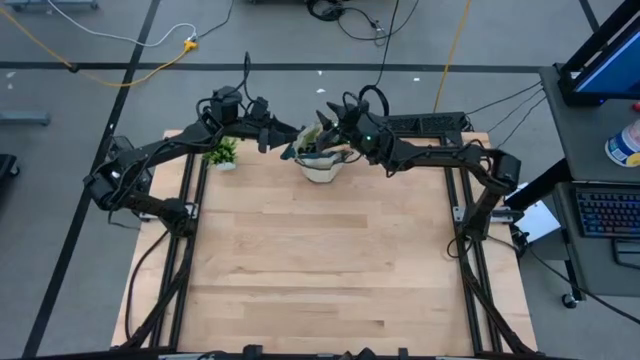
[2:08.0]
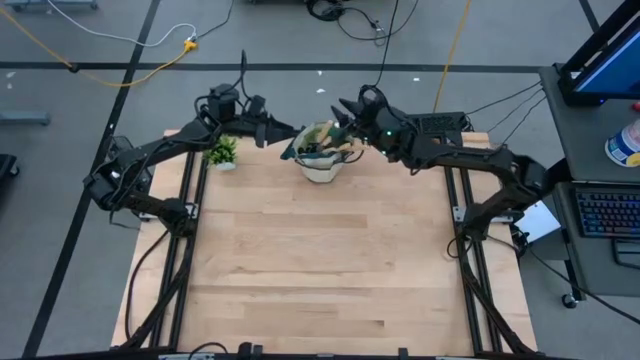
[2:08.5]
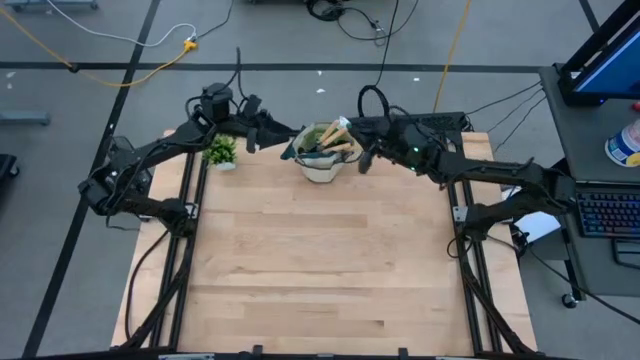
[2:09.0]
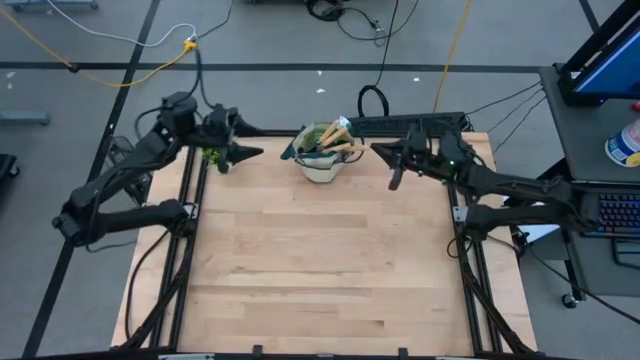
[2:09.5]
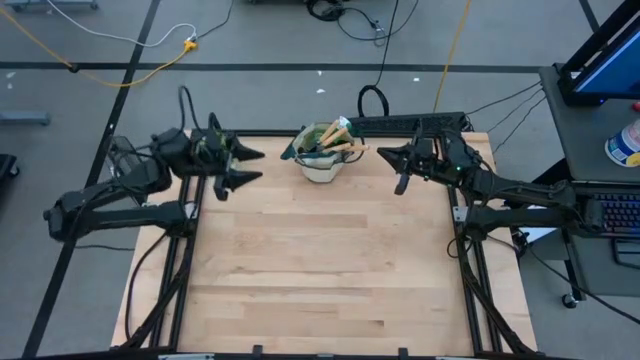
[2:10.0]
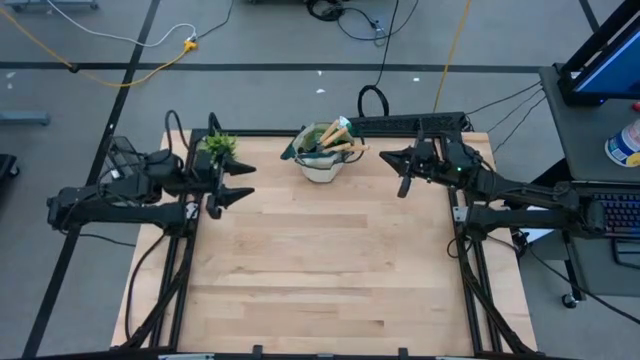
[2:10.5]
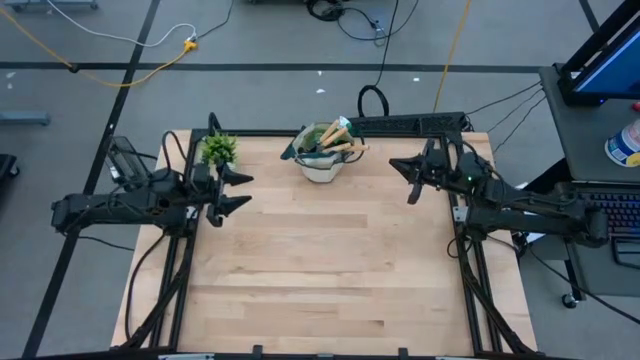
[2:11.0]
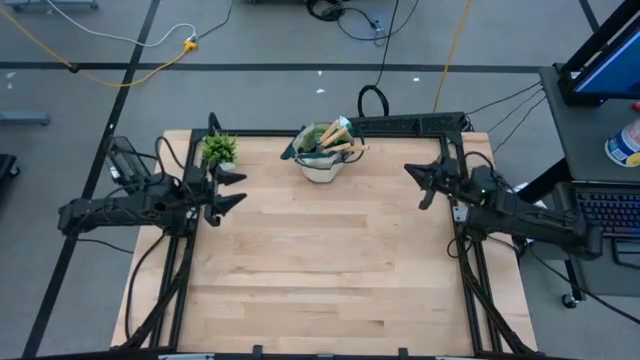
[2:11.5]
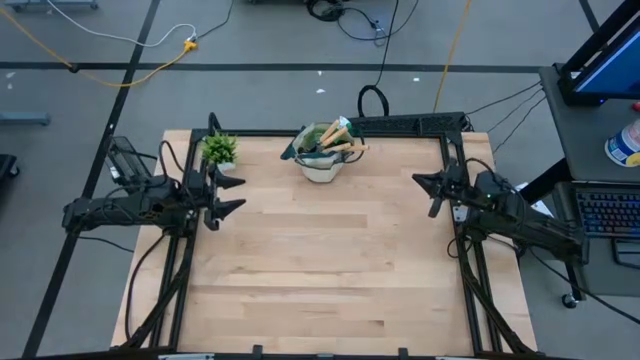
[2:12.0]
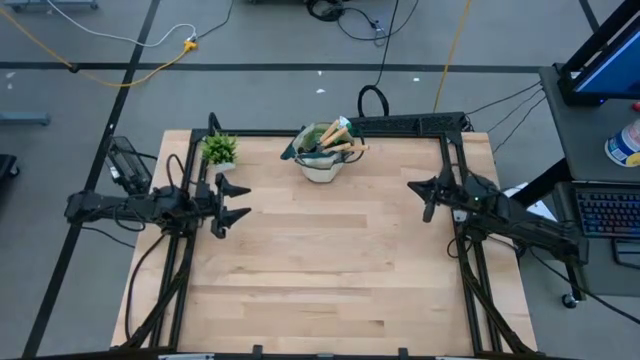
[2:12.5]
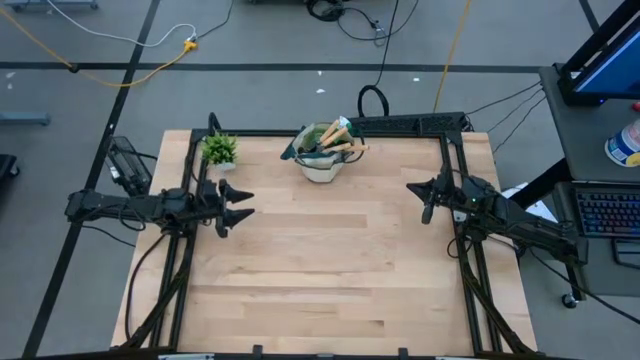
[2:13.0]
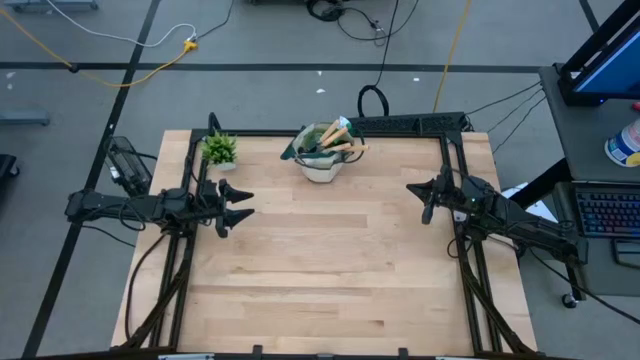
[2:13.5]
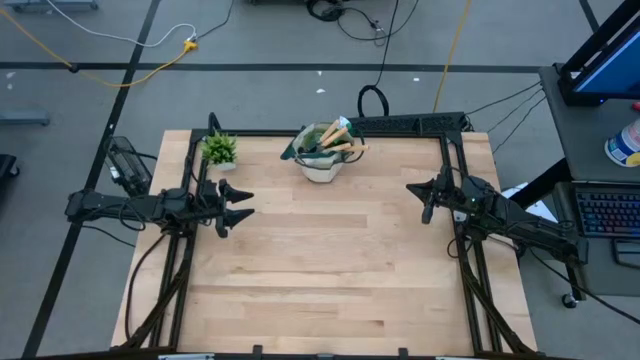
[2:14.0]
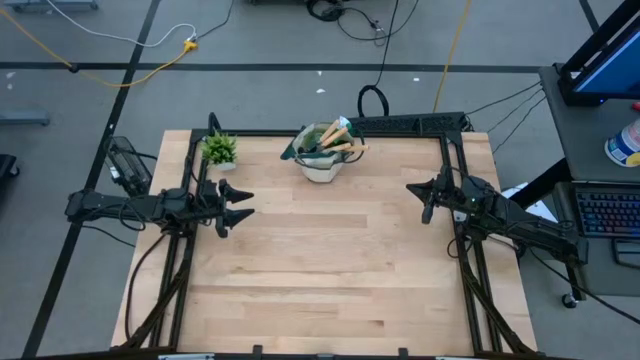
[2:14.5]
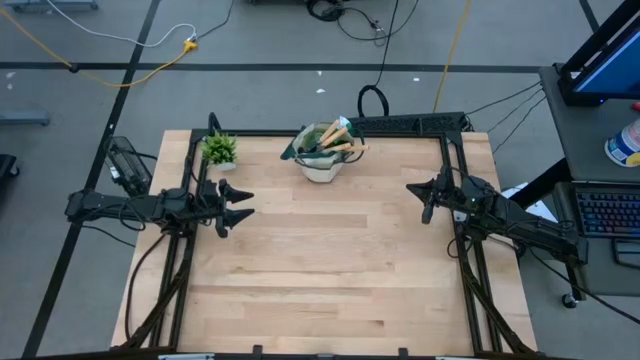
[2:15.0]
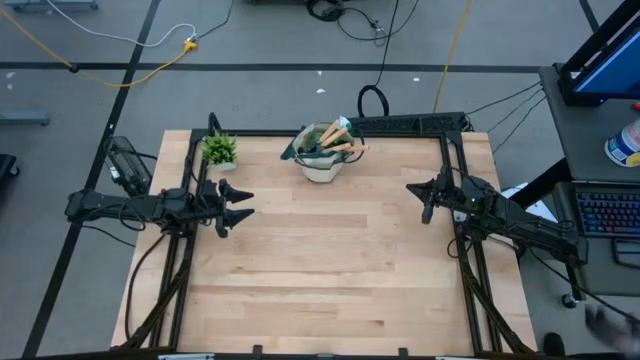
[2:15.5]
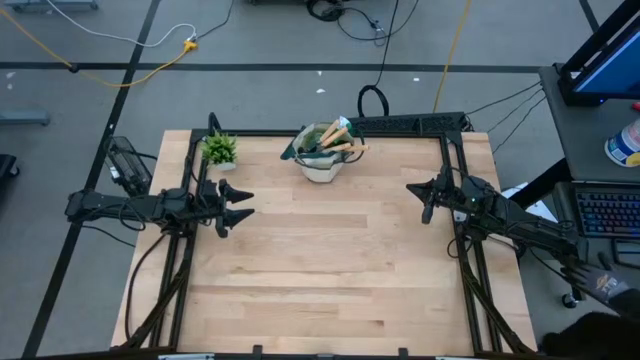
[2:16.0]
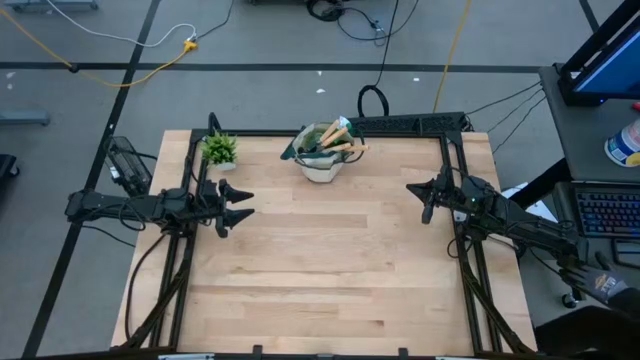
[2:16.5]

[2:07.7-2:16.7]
Task: Pick & Place Garden tools in Gardening bag
Return to Home Position

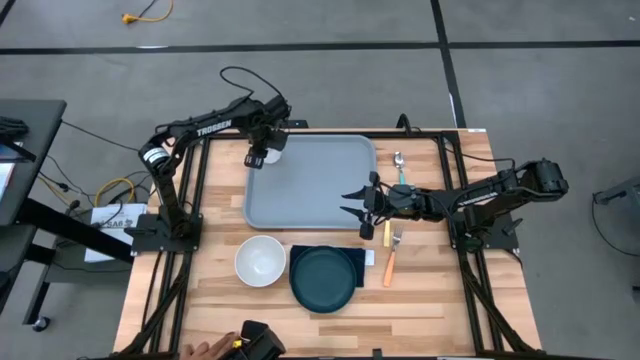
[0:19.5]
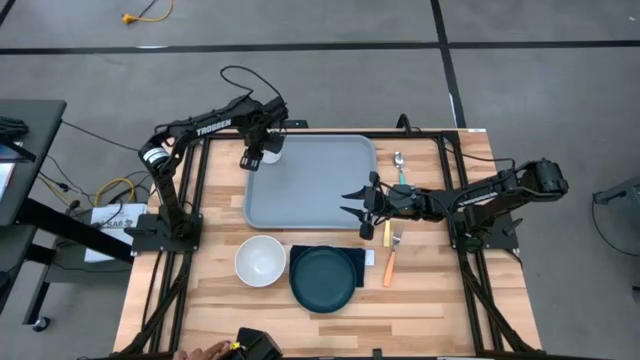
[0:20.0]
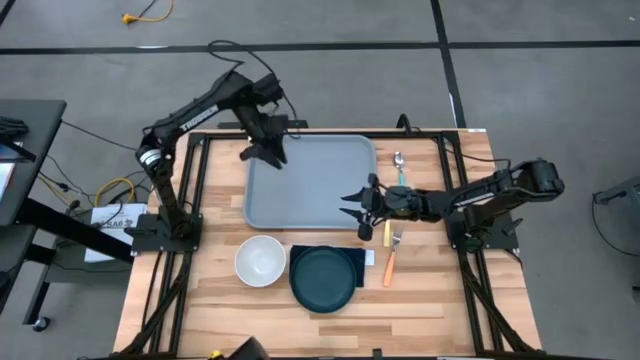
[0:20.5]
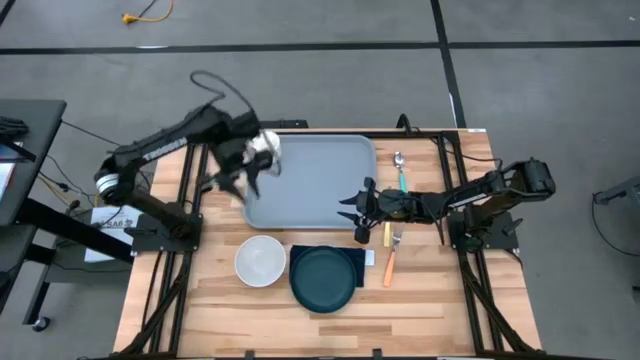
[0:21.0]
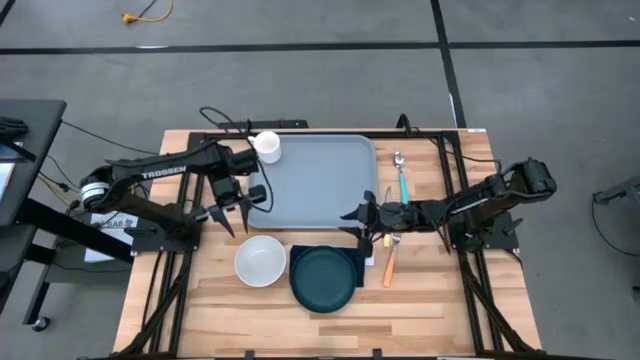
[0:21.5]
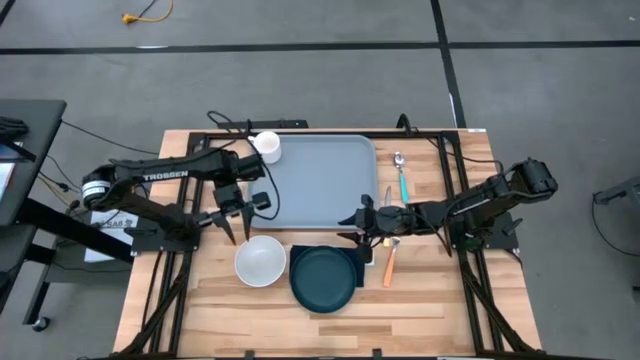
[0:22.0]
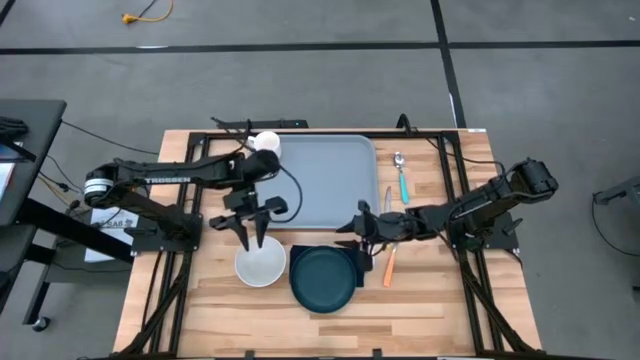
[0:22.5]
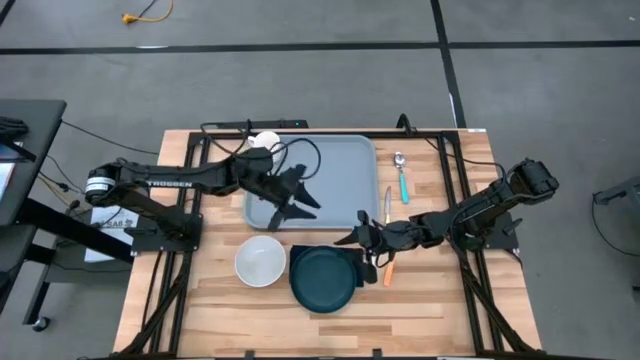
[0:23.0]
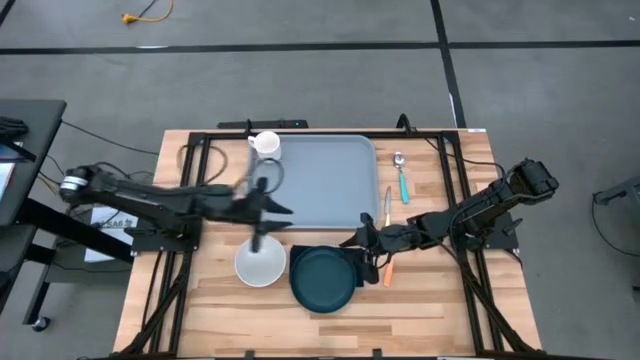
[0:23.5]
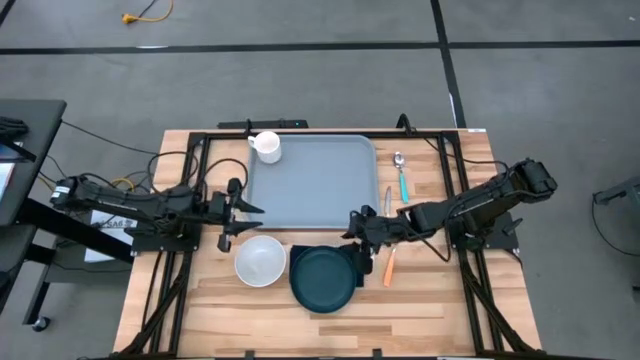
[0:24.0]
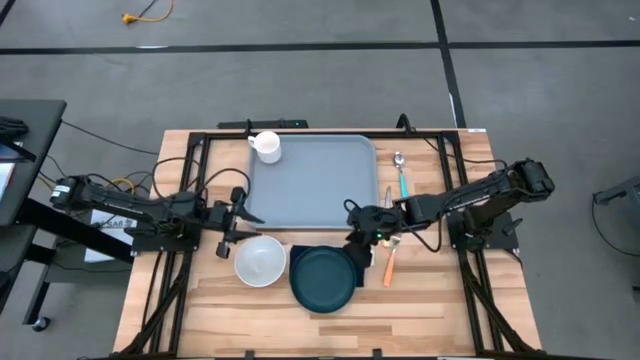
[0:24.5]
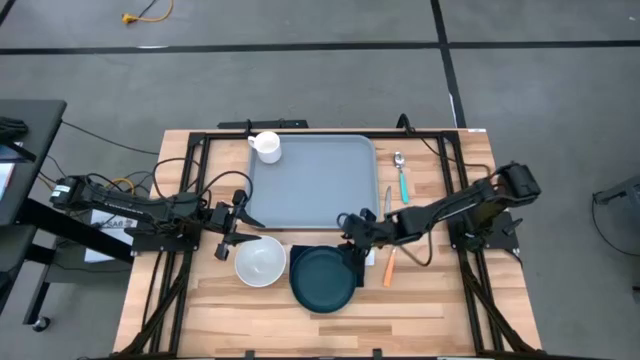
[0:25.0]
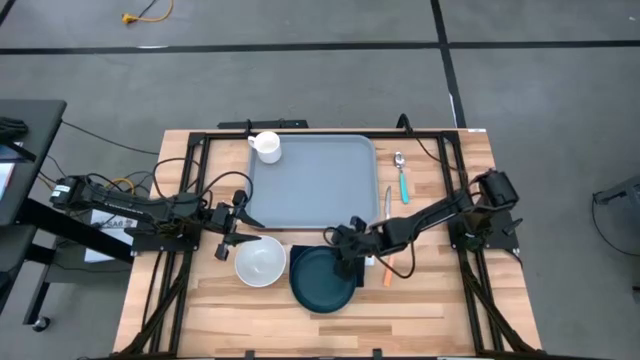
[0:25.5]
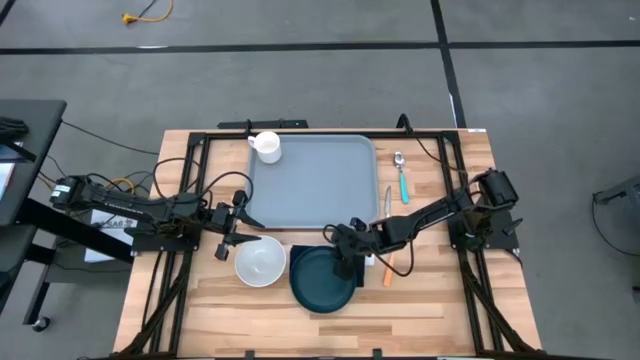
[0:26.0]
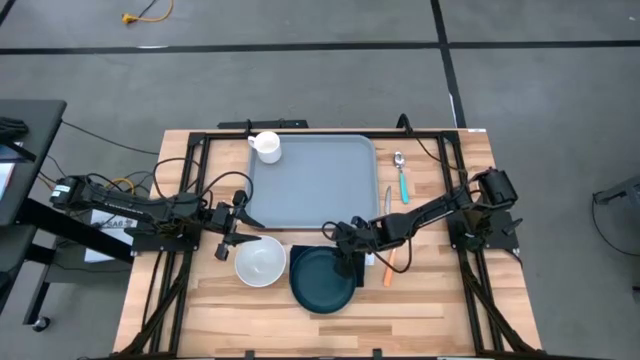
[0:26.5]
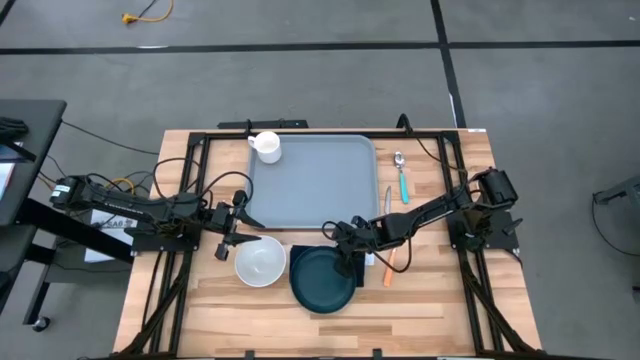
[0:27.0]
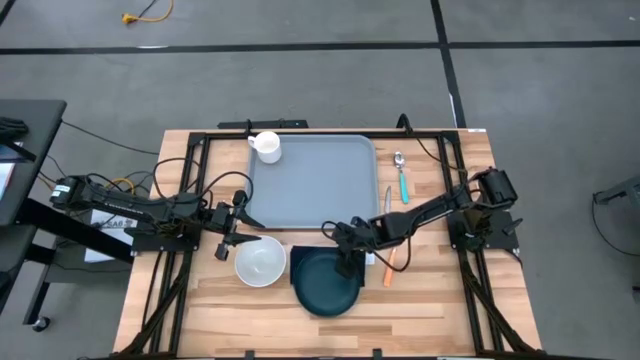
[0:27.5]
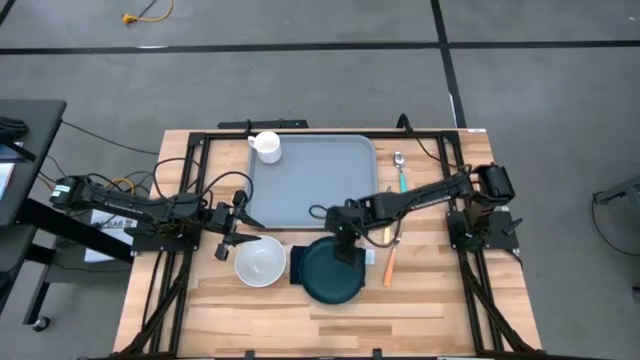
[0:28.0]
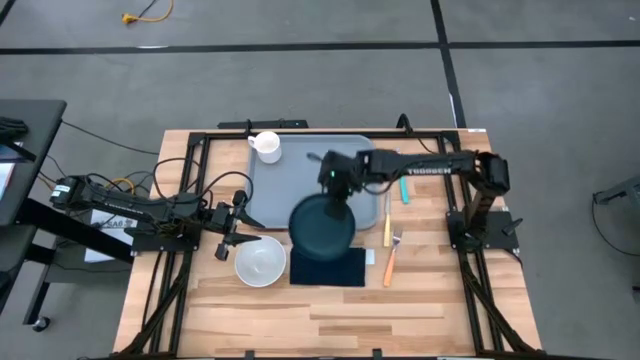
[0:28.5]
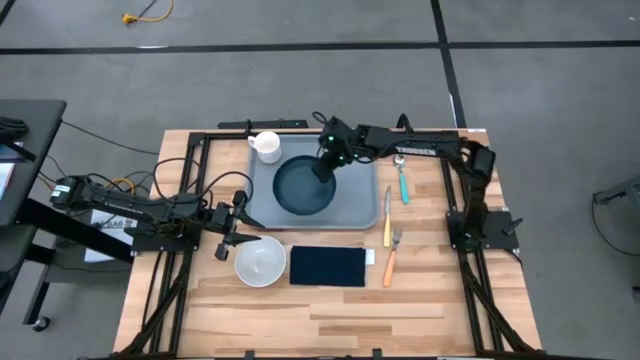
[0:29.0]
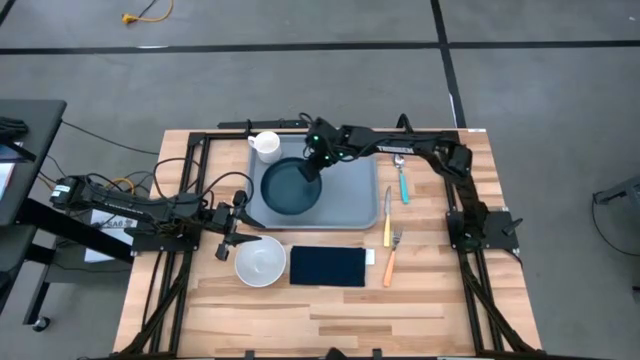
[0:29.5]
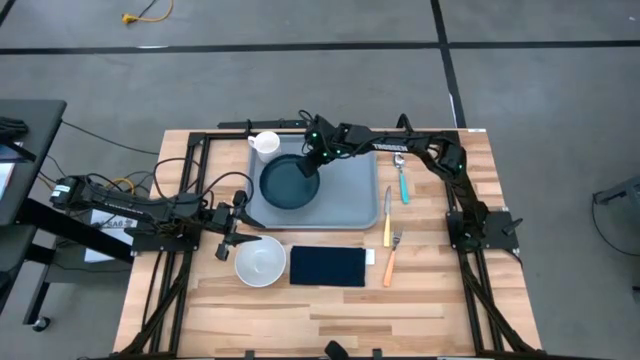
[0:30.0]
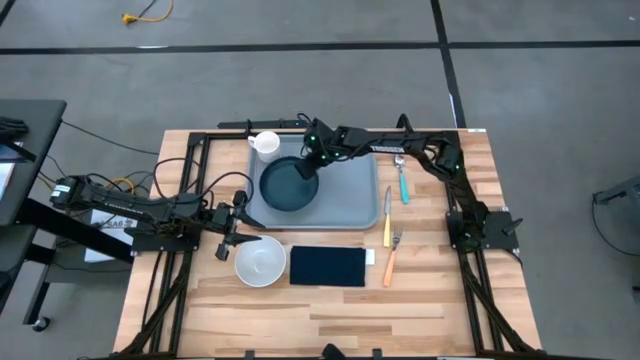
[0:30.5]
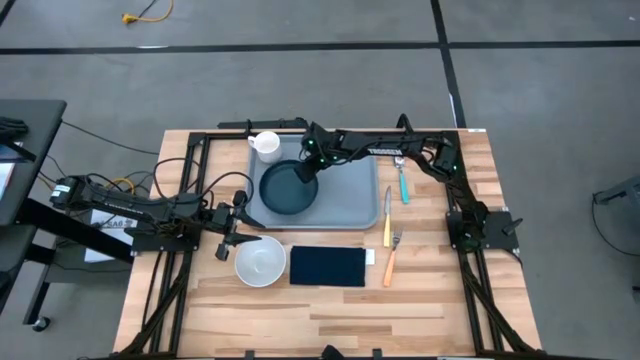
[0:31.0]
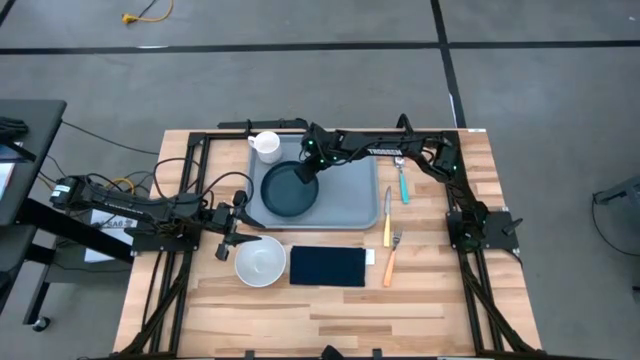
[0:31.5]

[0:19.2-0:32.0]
Task: Set up tray
Put the black plate on the bottom left of the white mug
